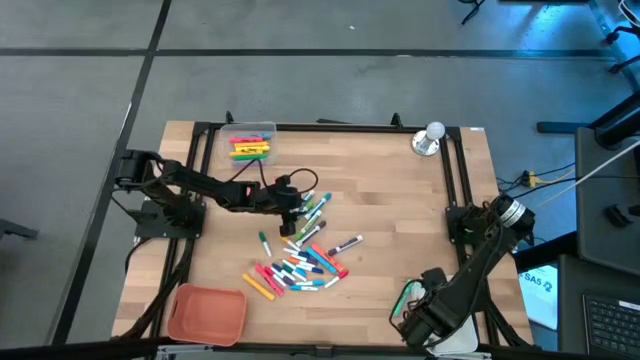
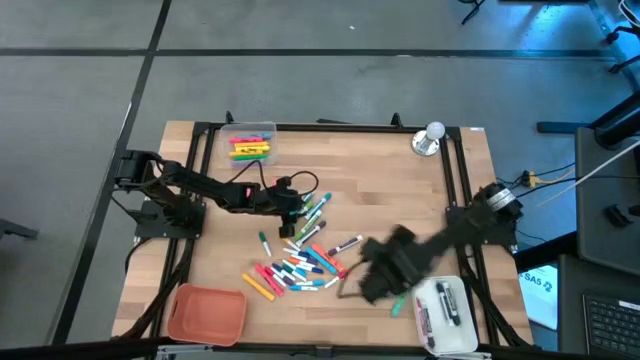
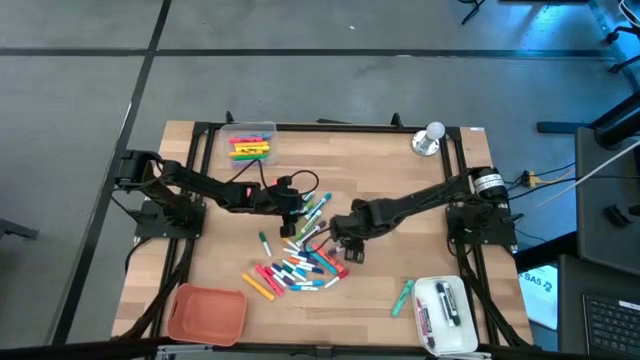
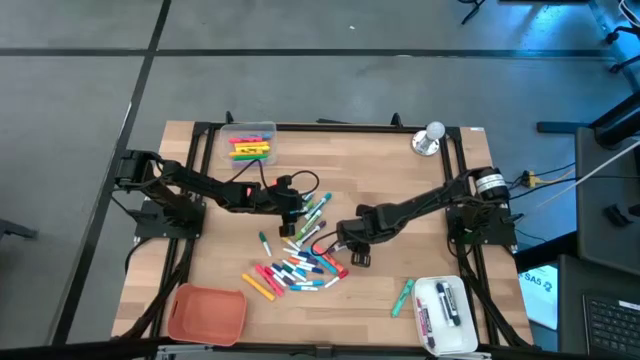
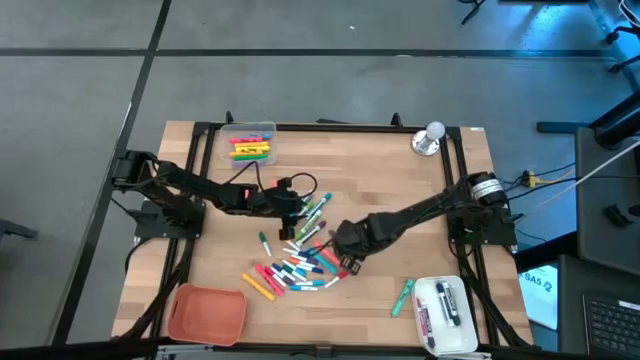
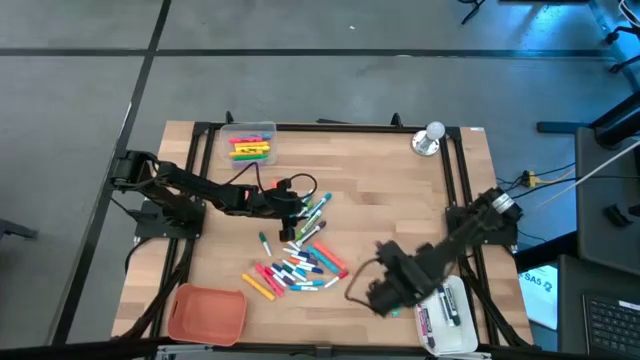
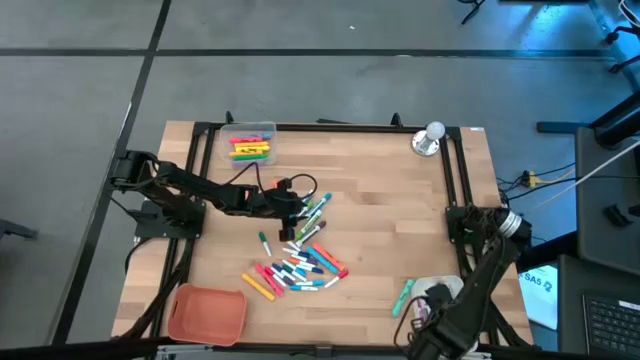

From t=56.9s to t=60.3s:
Task: Pick & Place Markers
Put the middle right violet pen into the white bin

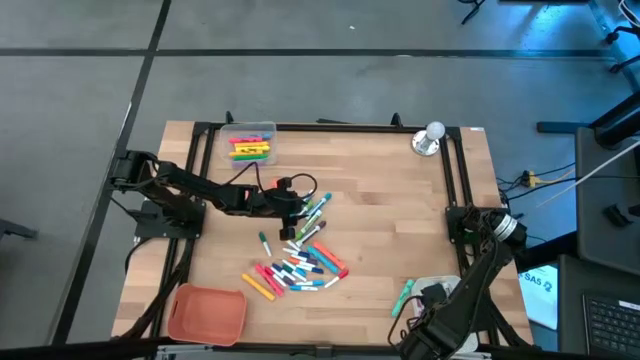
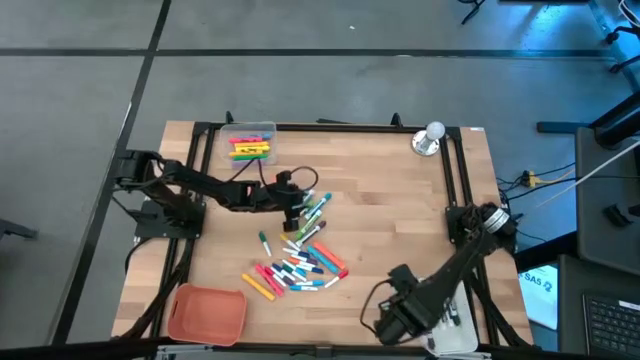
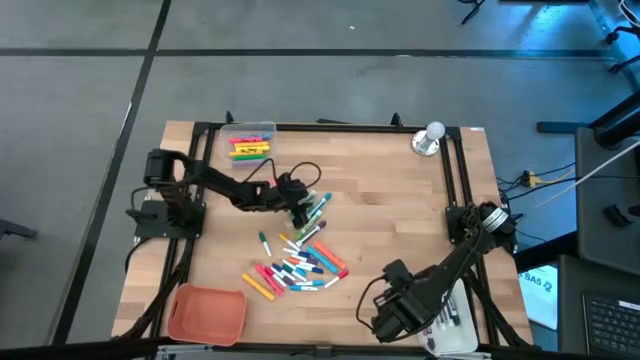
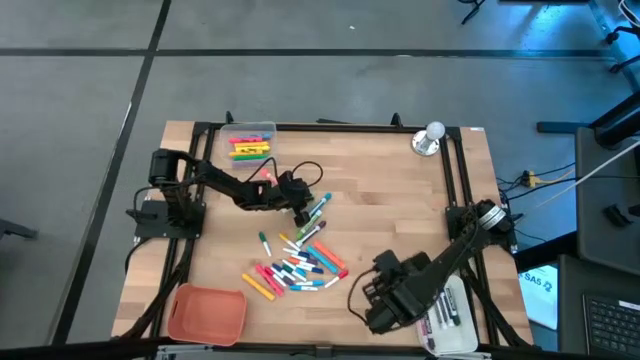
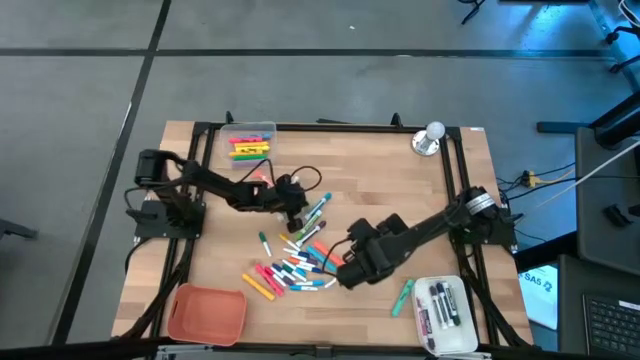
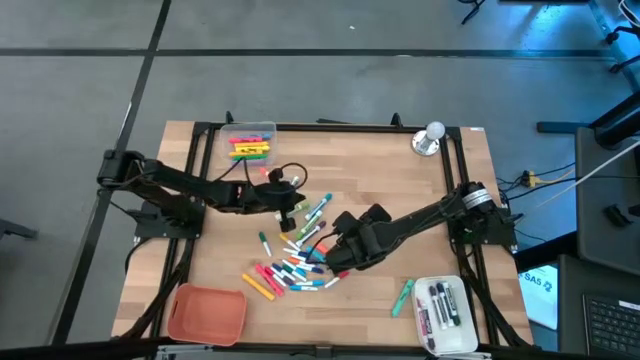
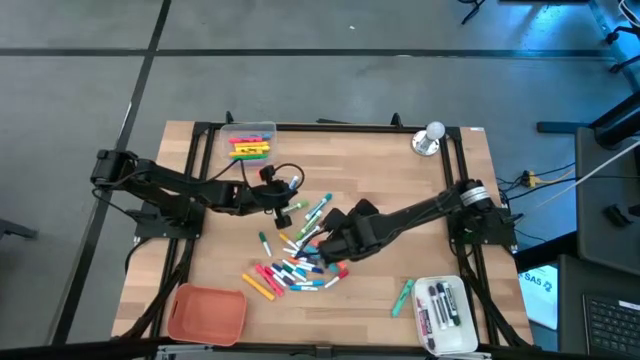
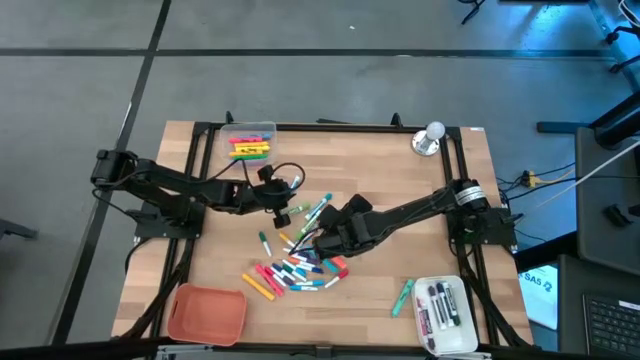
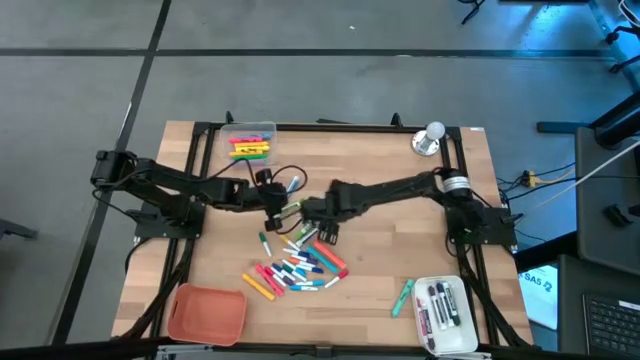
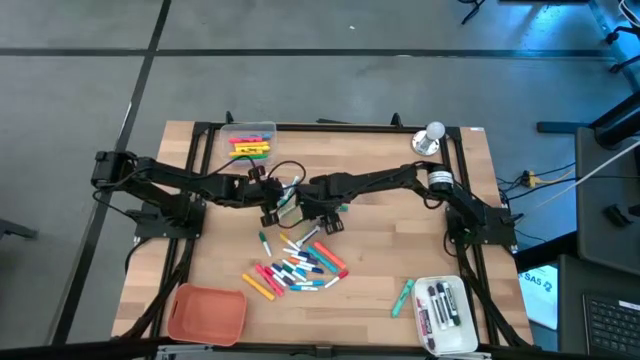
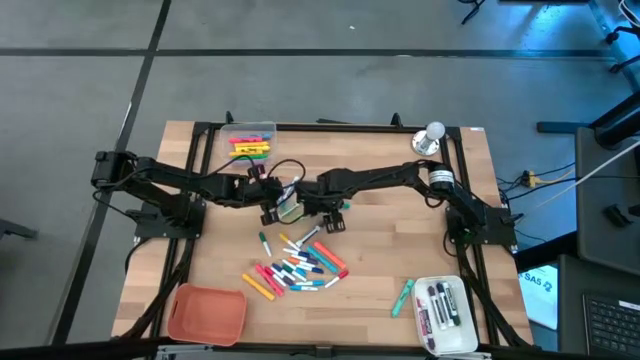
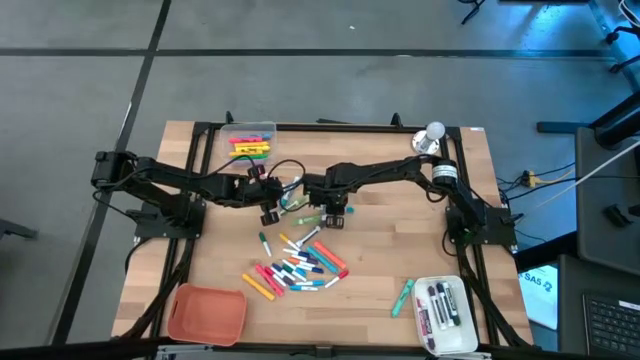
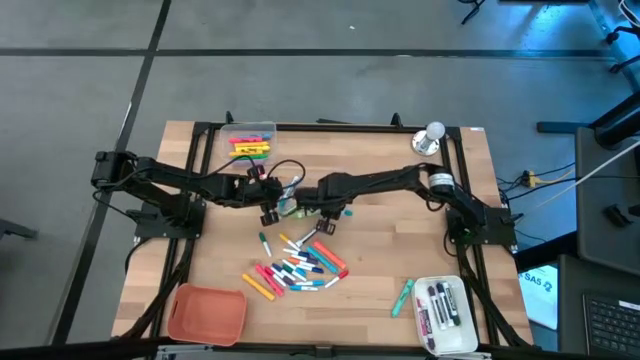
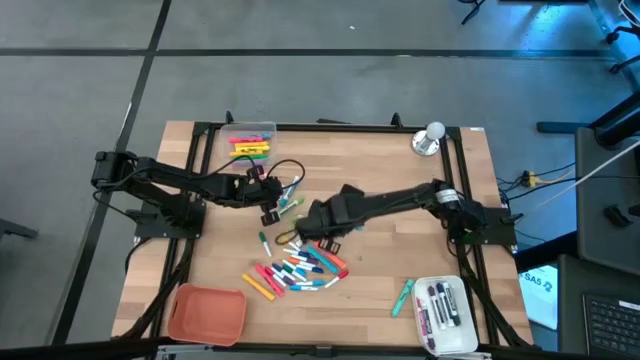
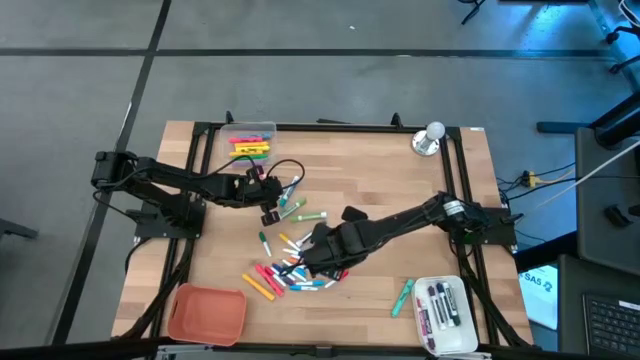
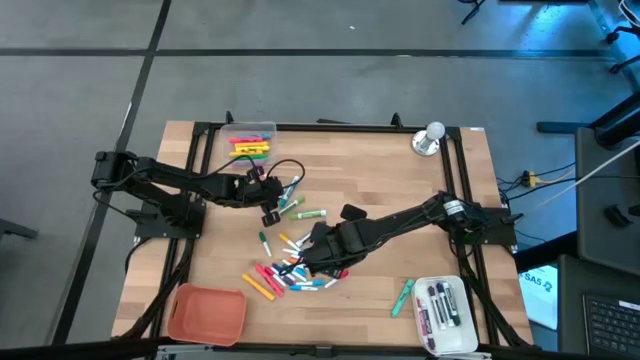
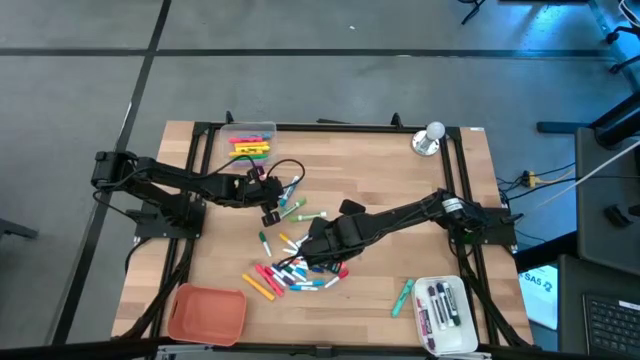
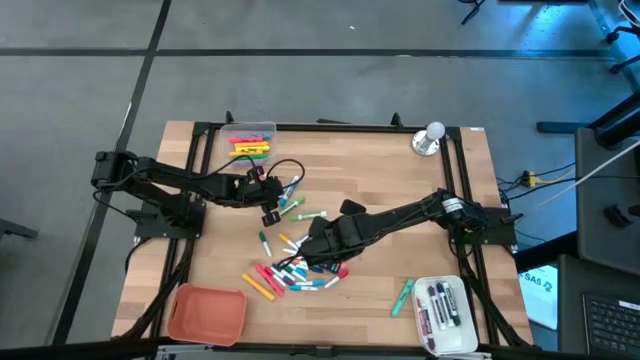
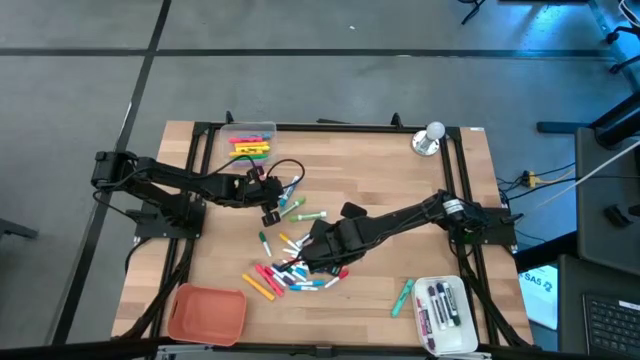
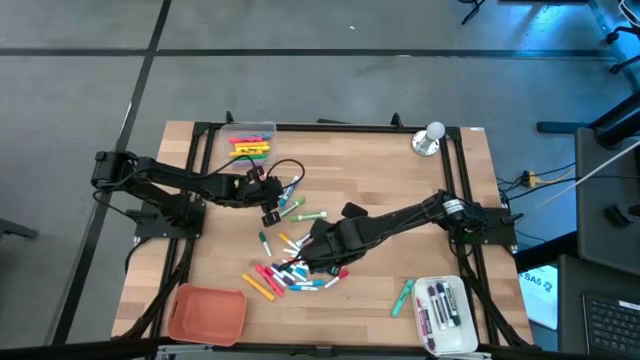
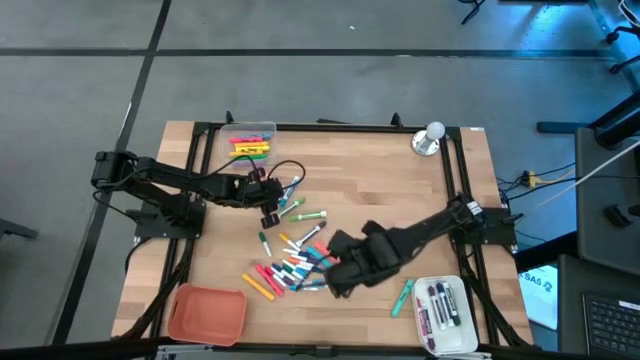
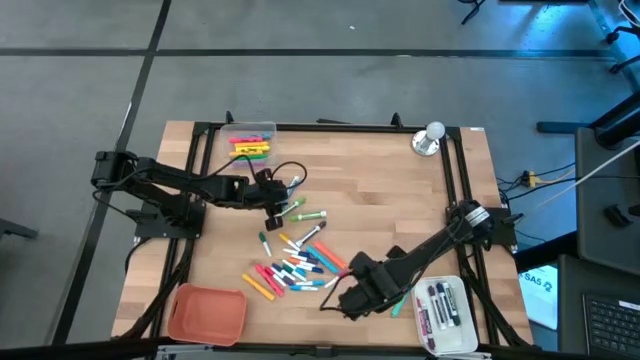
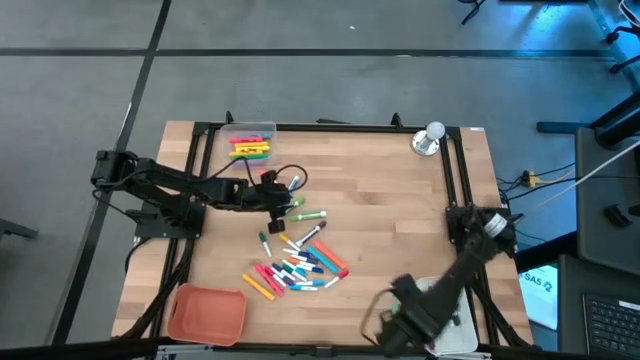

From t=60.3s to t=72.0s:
Put the middle center pitch blue pen into the white bin

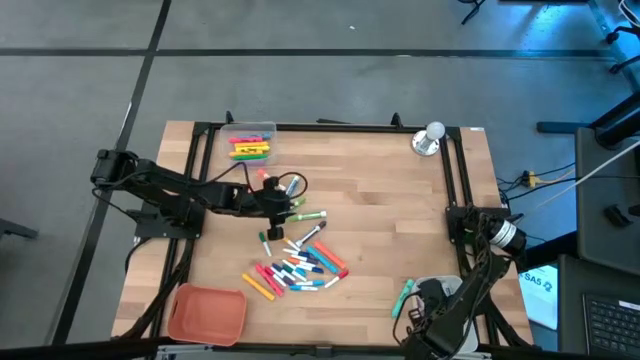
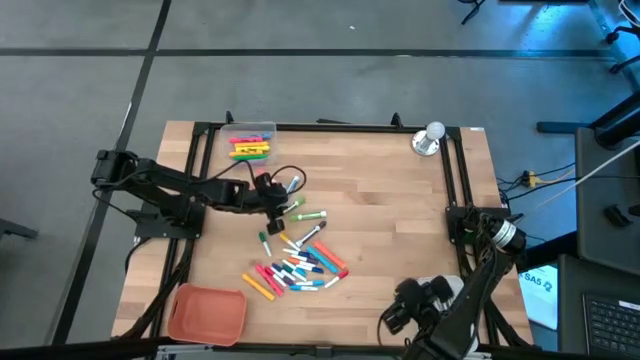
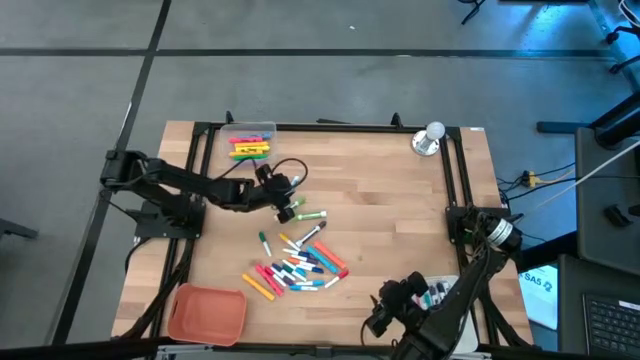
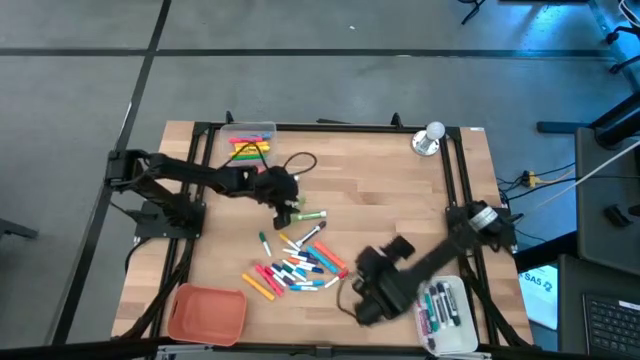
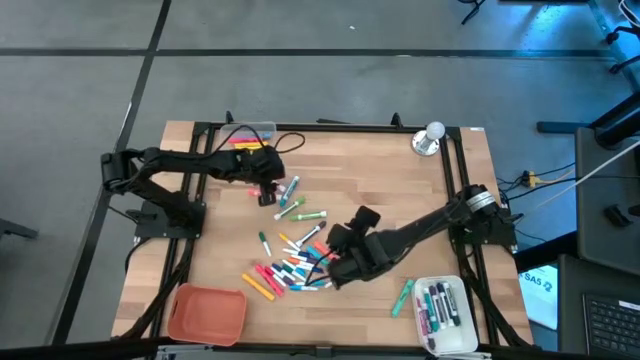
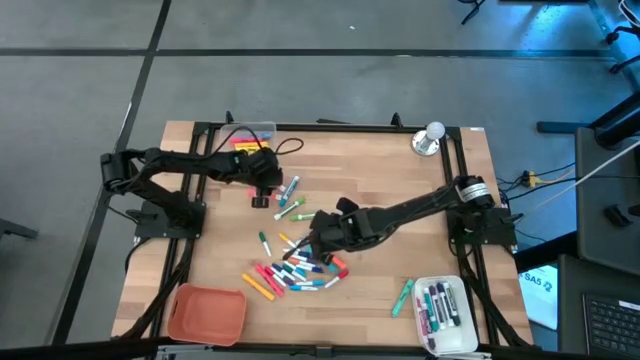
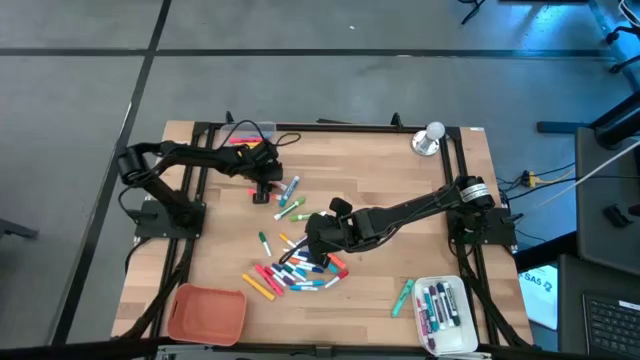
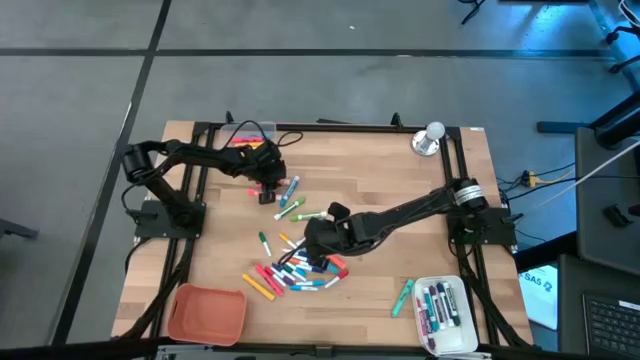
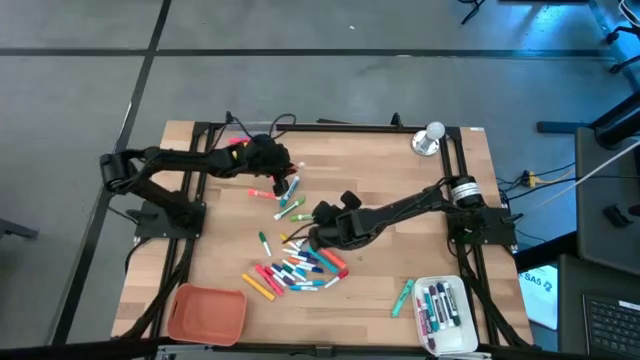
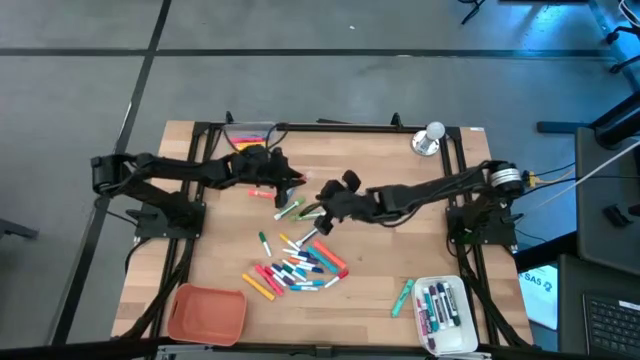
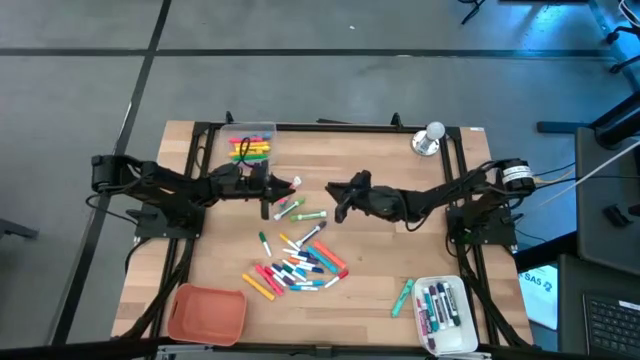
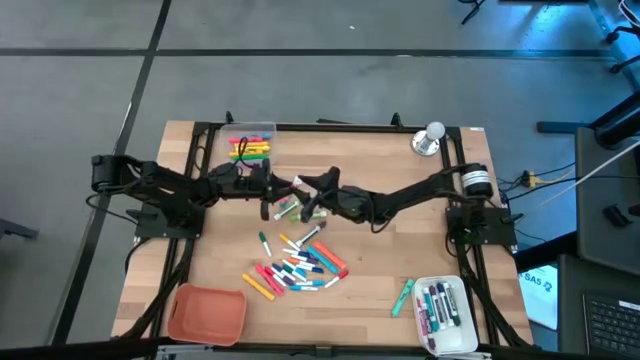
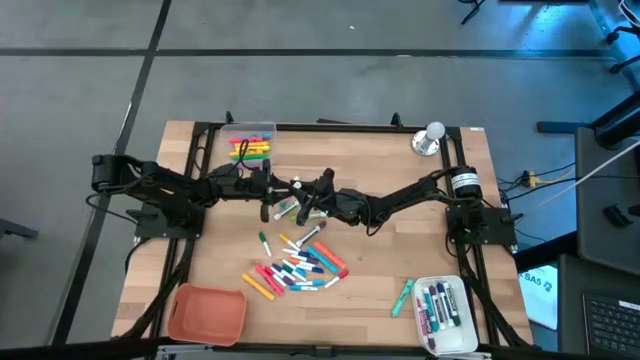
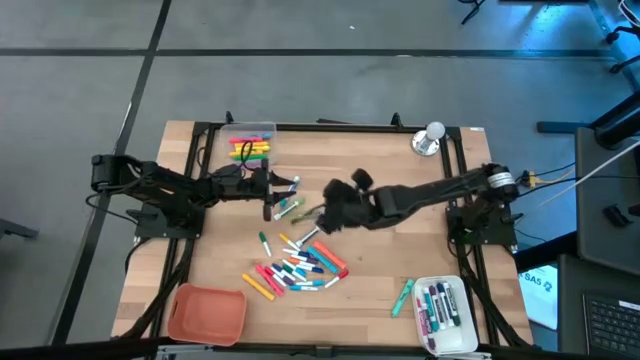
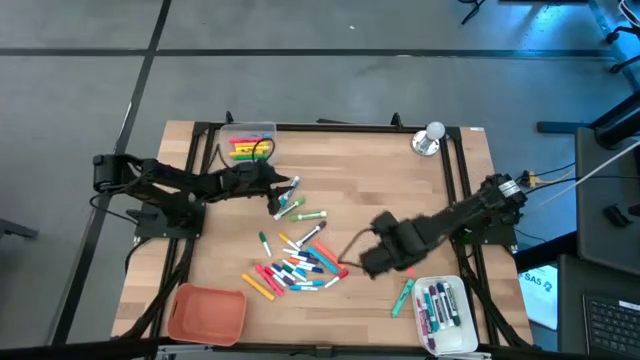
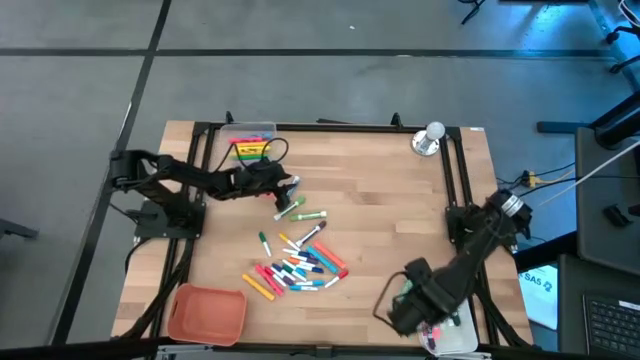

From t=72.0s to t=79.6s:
Put the orange pen into the white bin
